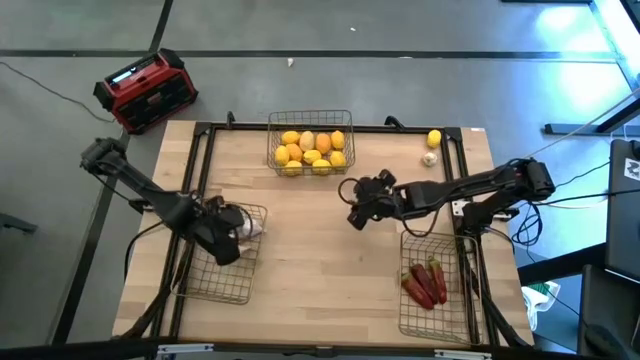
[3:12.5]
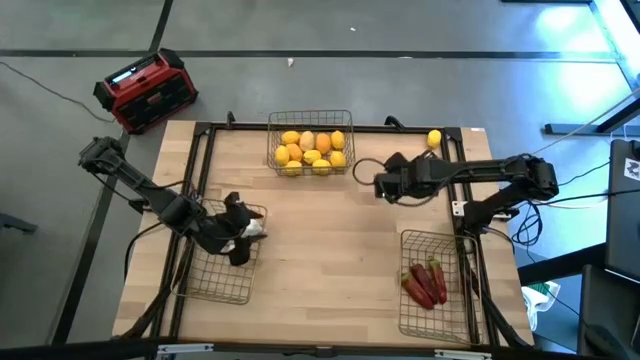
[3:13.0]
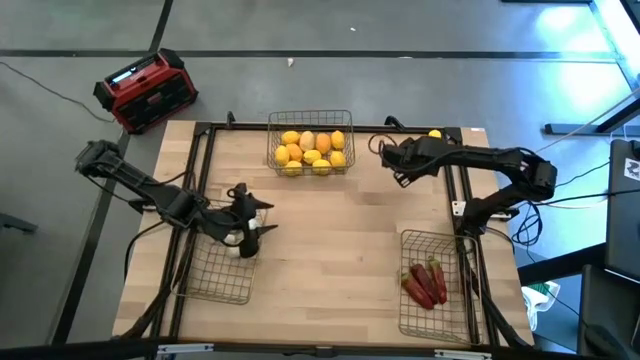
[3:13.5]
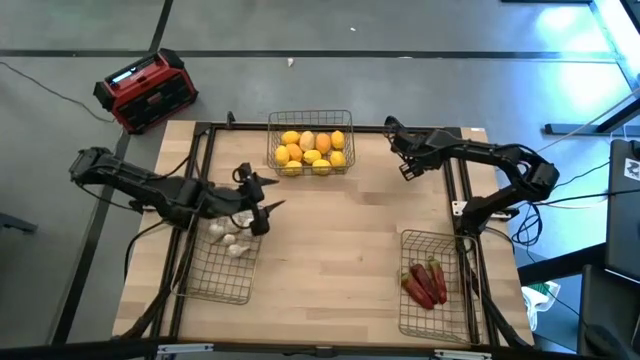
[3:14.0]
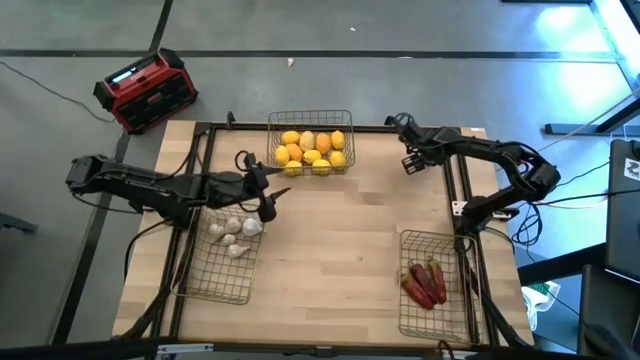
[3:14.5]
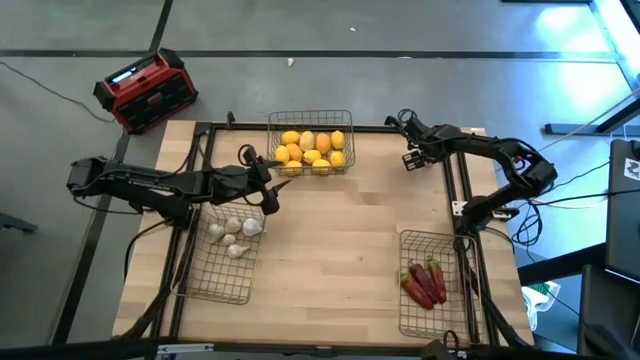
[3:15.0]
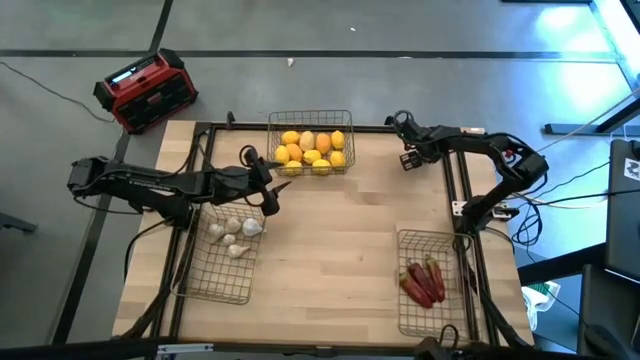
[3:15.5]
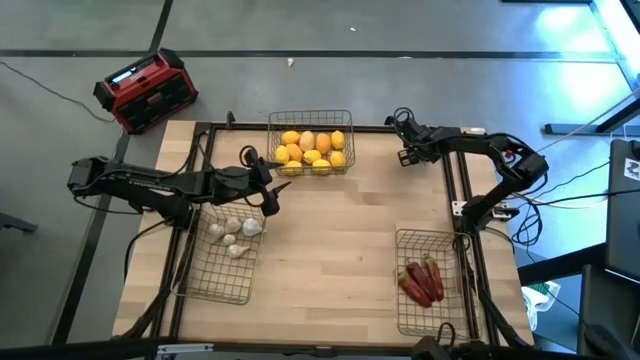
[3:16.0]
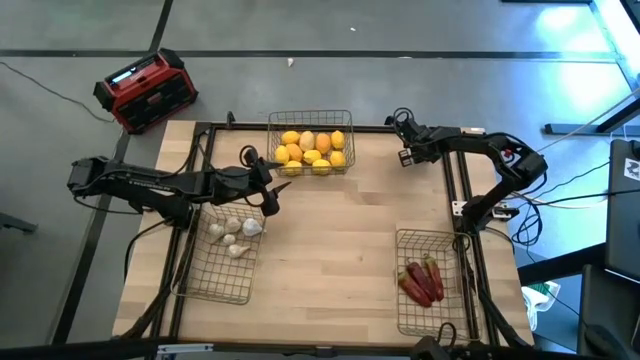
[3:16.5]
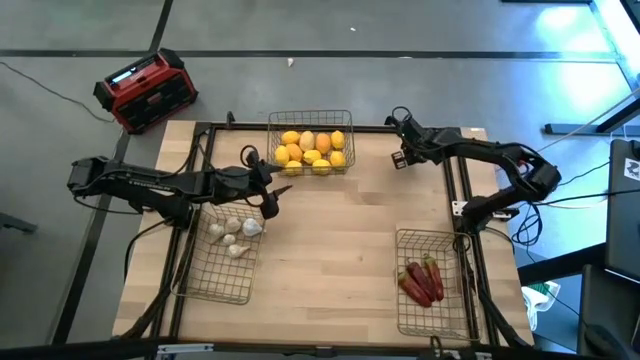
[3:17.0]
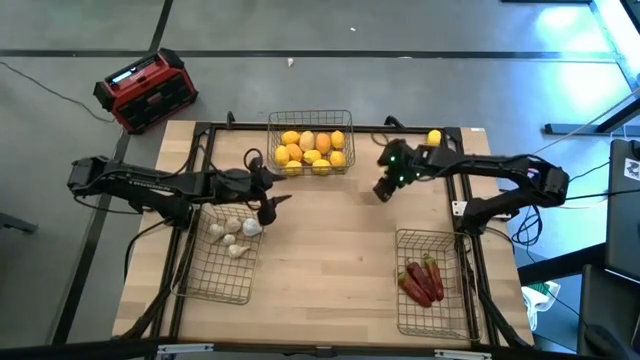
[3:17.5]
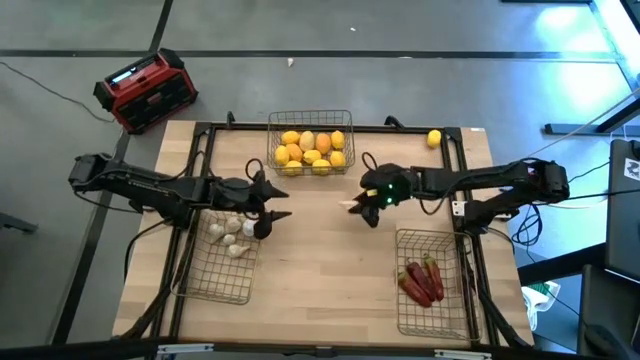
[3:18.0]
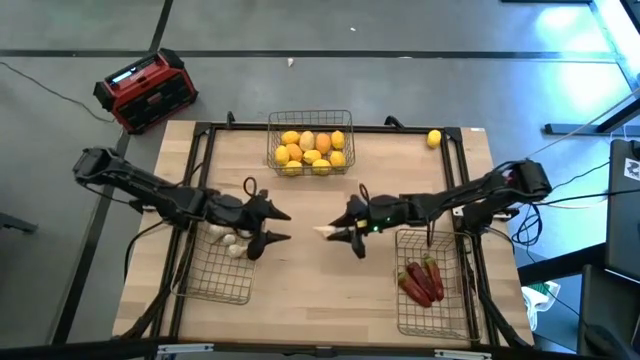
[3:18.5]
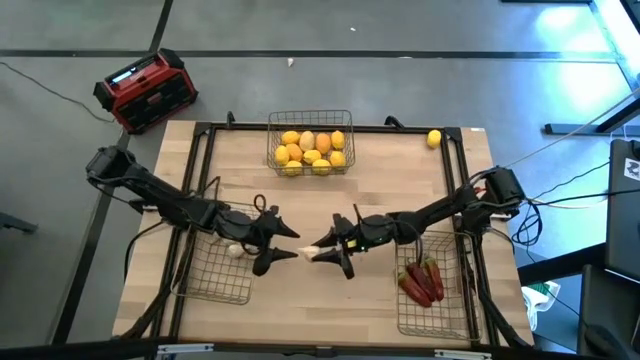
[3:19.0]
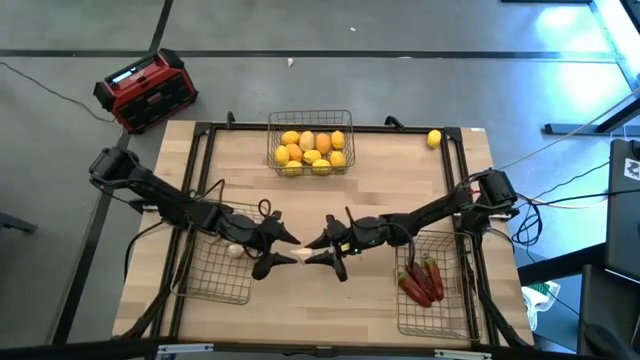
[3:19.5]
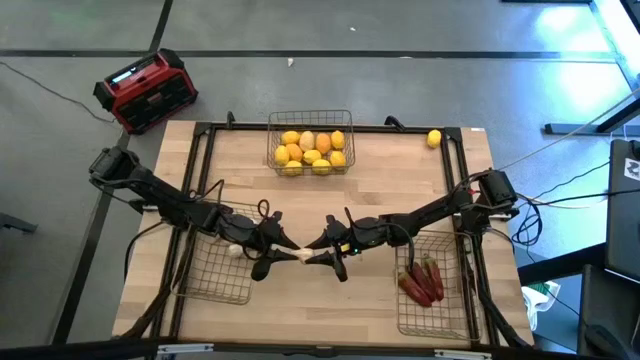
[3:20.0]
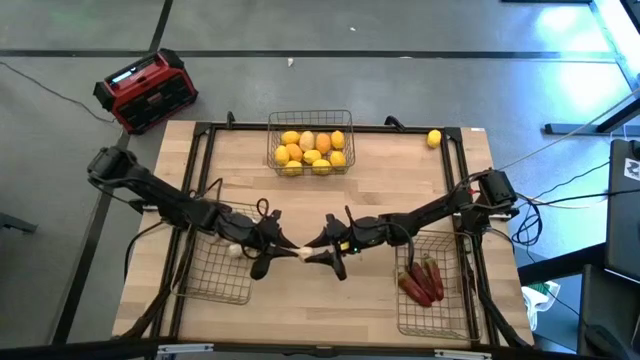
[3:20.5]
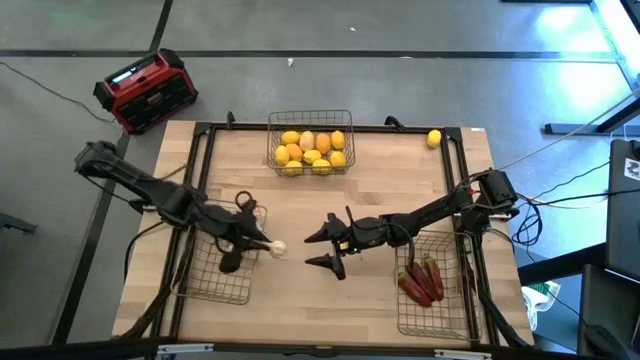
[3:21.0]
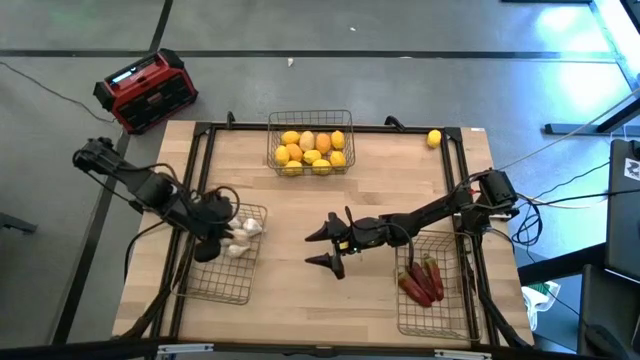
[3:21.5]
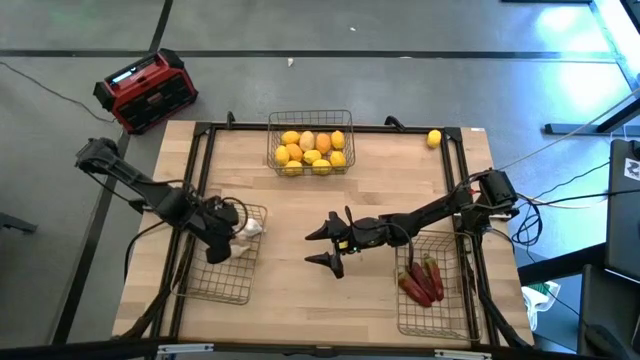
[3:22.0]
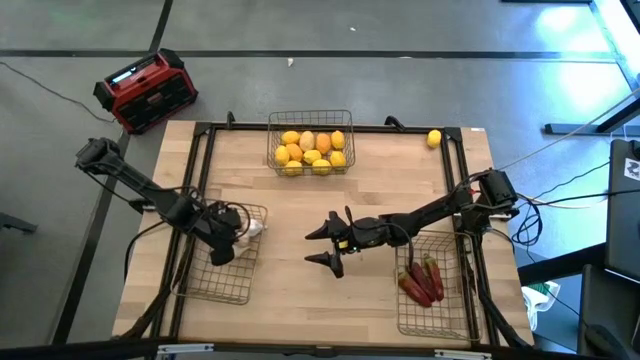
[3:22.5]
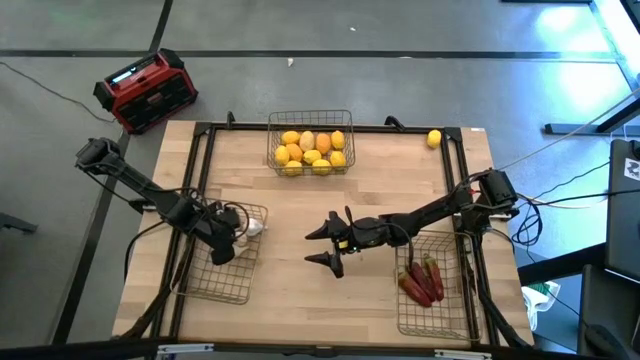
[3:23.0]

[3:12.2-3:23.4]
Task: Sort produce into baskets
Put the garlic into the bottom left wire basket

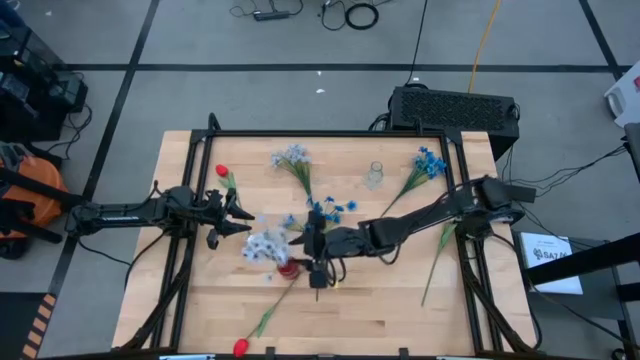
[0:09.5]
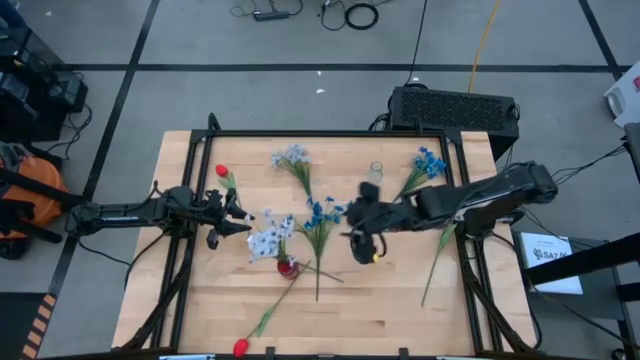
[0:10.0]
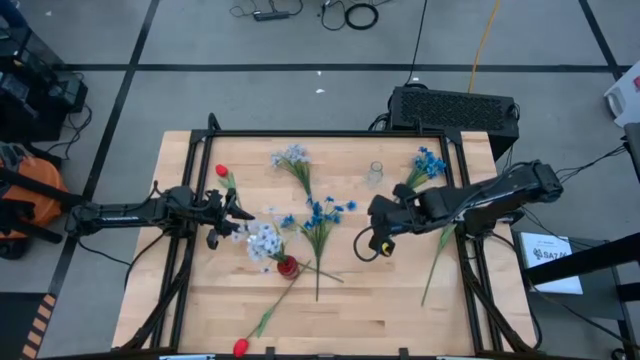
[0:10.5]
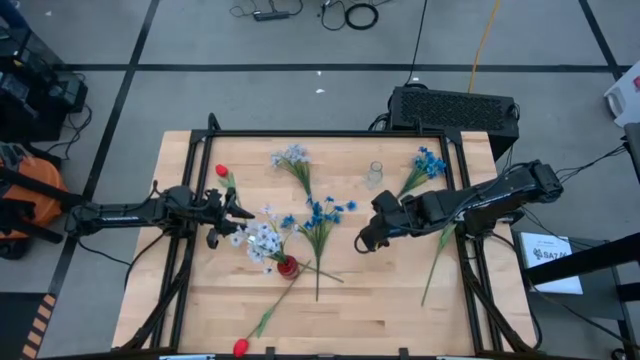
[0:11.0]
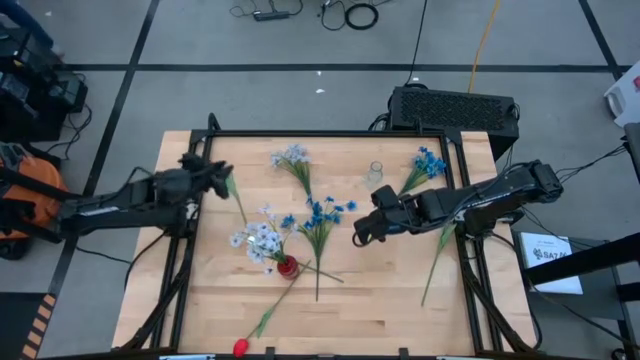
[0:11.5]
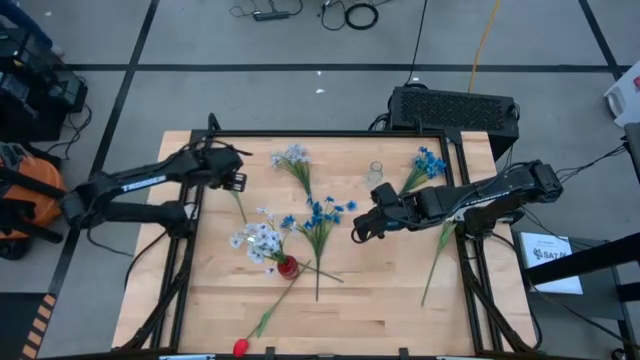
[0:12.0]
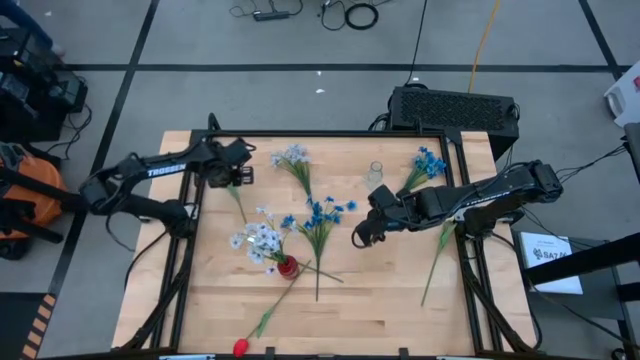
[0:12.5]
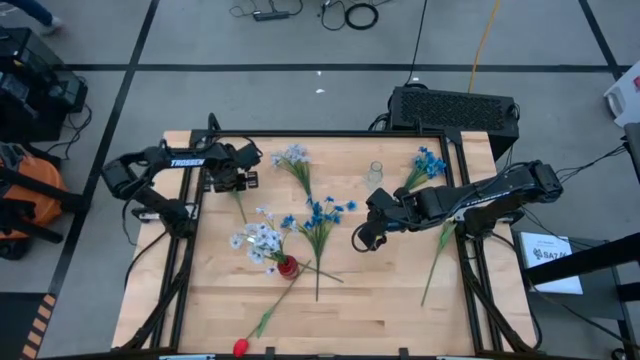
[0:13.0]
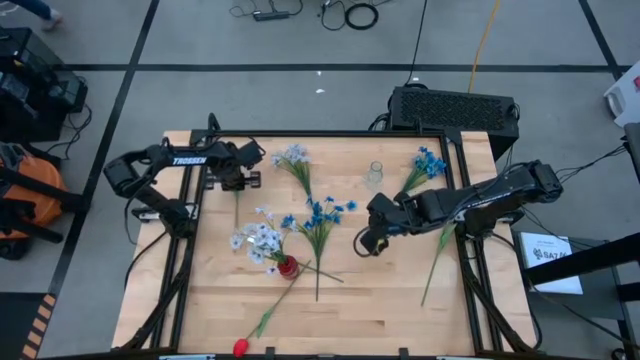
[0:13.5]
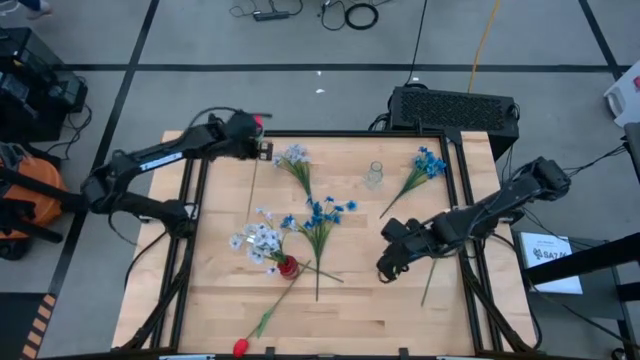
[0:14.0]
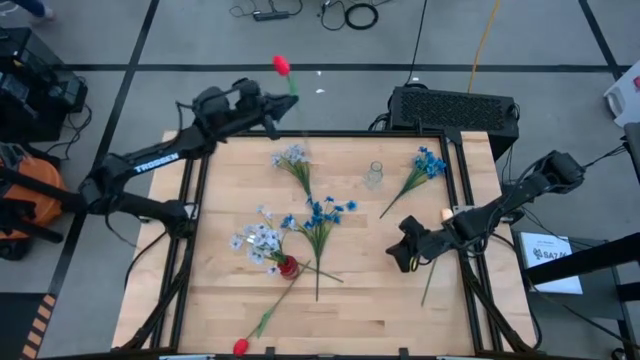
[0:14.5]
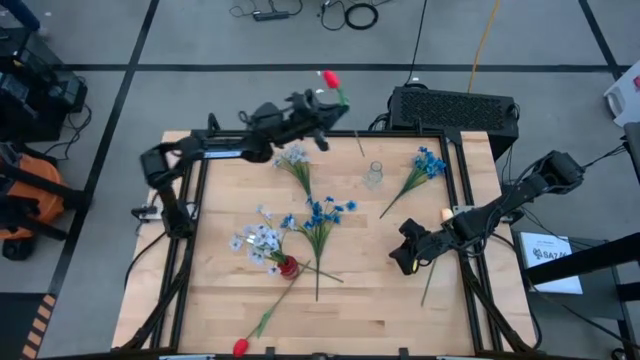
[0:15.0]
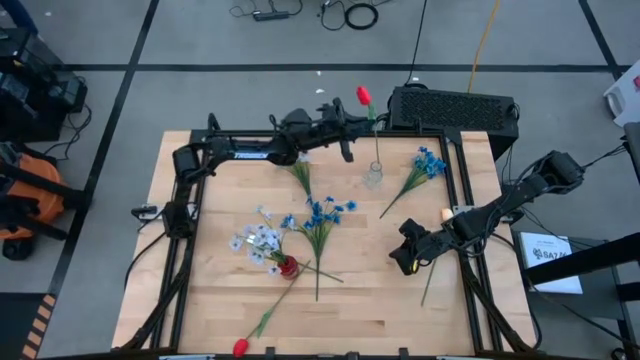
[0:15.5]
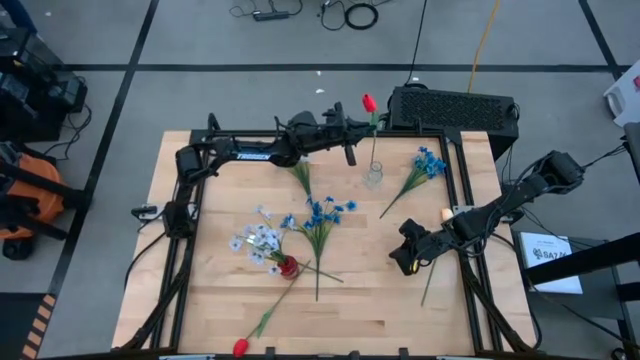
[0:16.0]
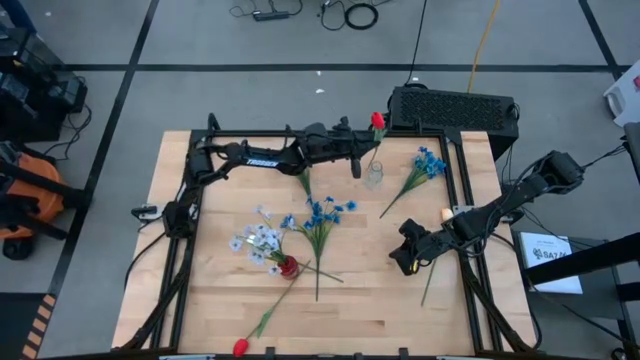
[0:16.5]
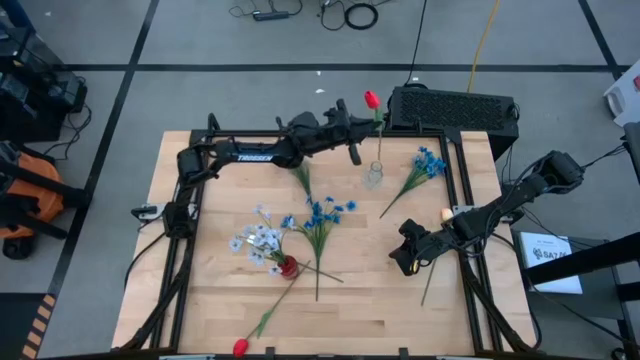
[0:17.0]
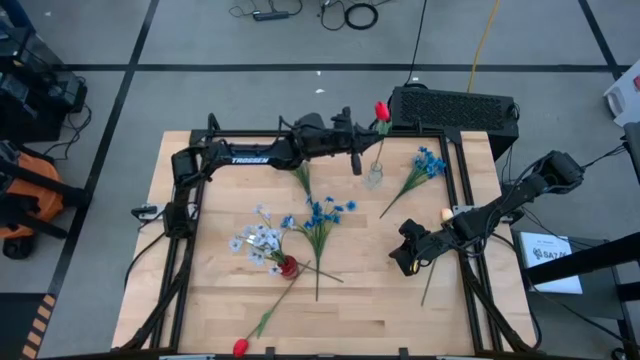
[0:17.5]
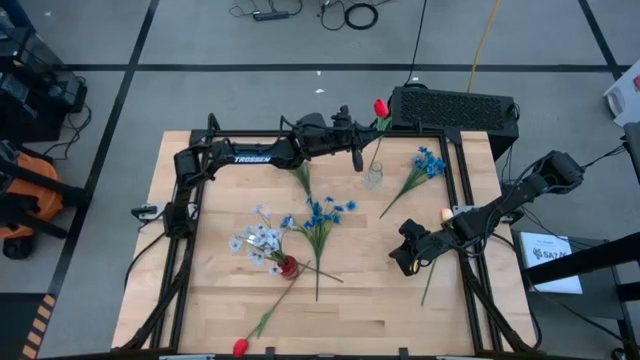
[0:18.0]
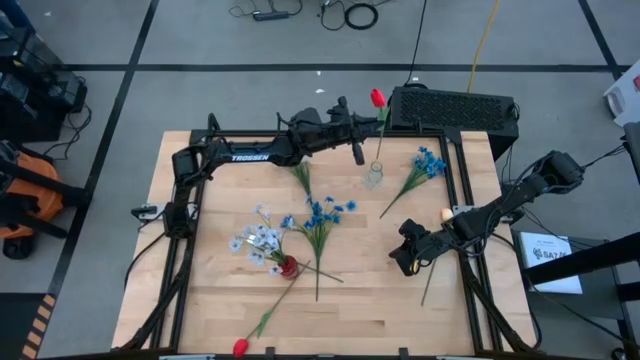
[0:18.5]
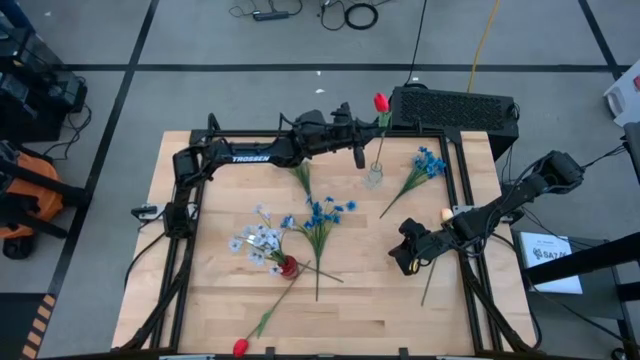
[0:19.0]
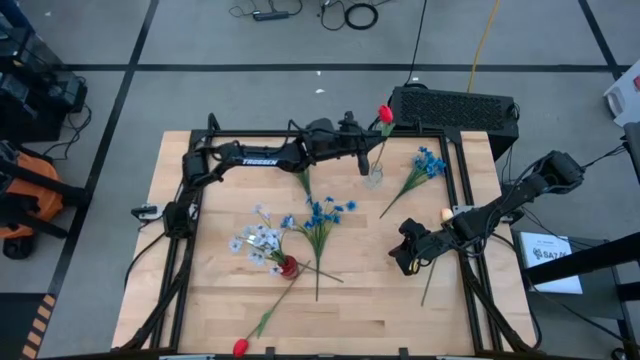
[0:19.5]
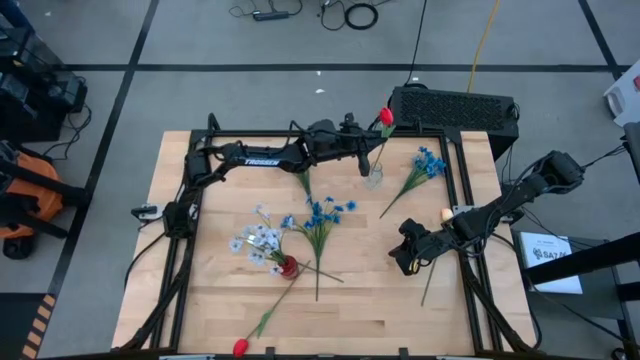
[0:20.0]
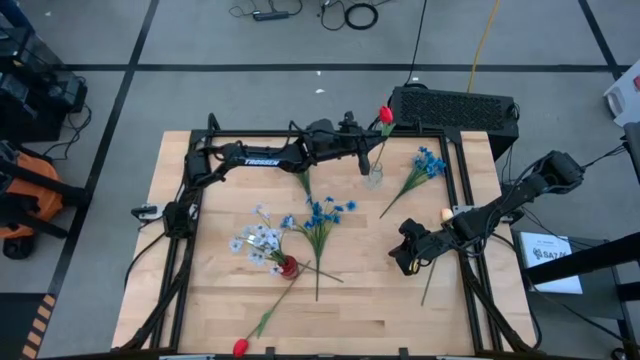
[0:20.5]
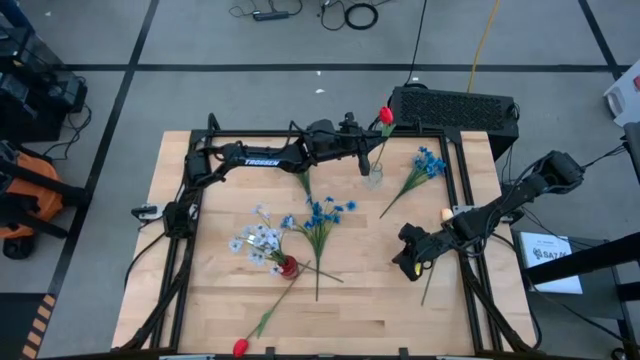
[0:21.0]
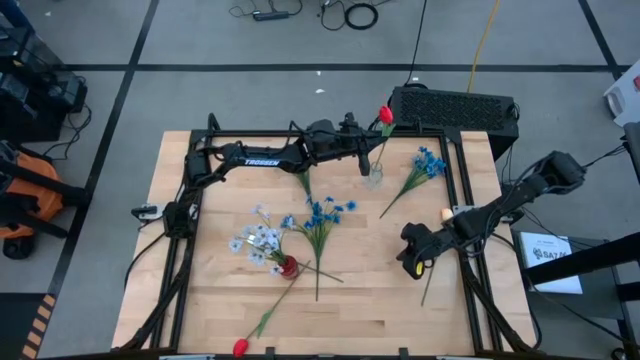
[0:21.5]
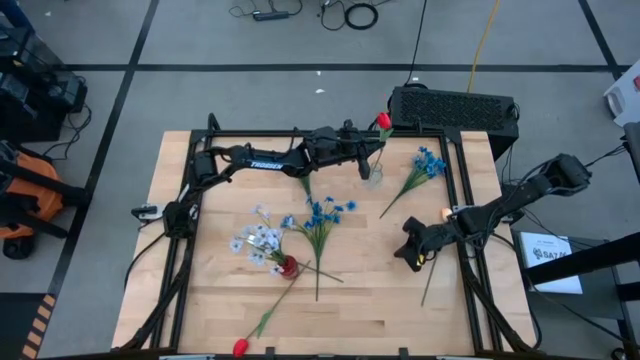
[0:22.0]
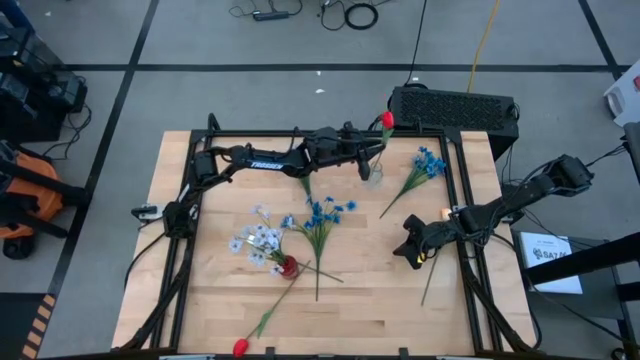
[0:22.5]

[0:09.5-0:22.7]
Task: Sort flowers into vase by color
Put the top red flower into the transparent vase
